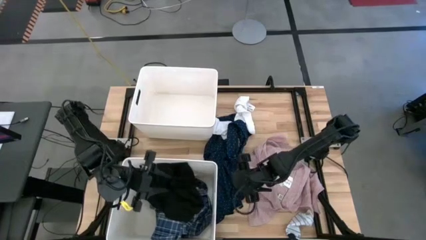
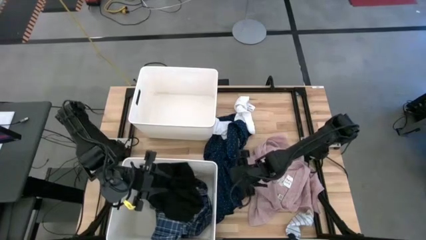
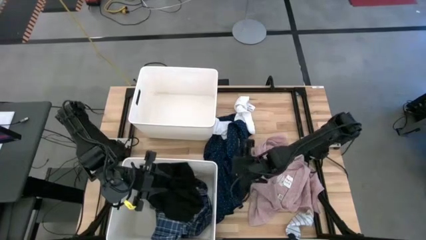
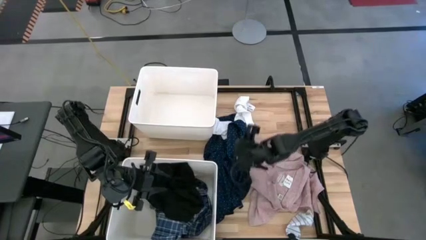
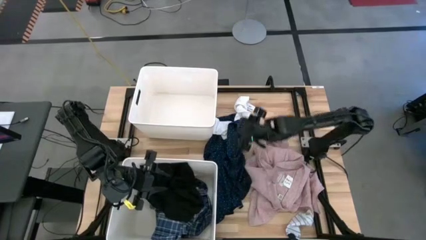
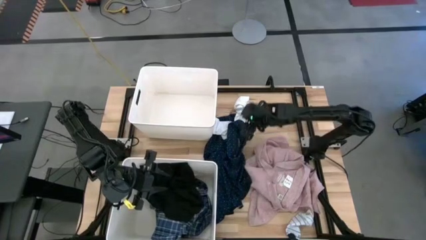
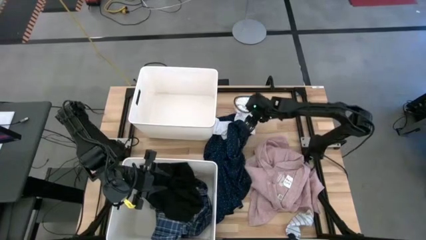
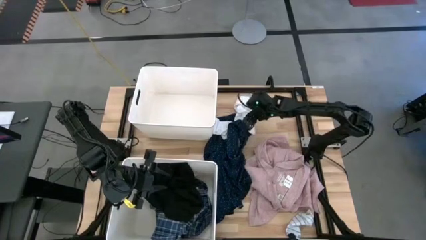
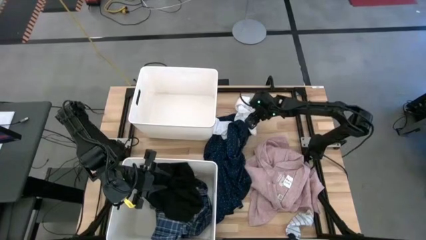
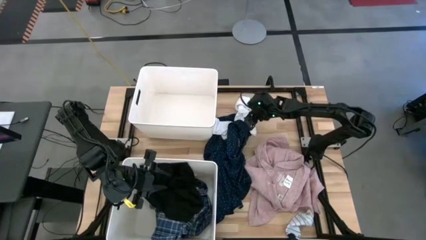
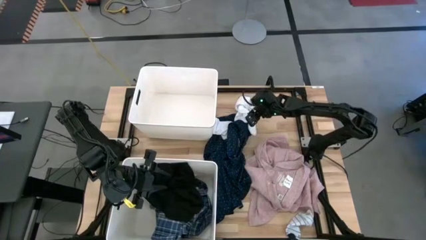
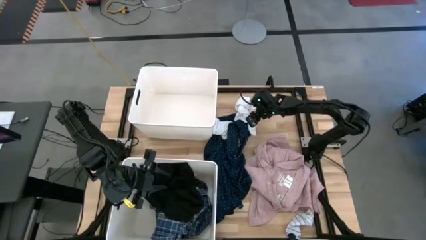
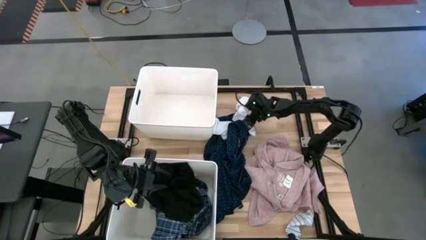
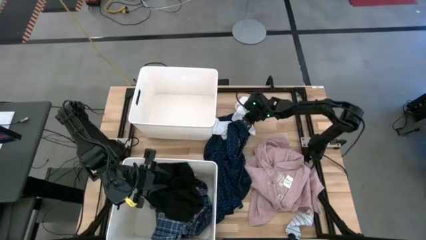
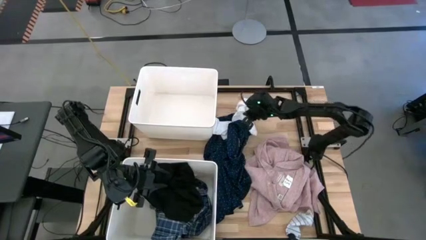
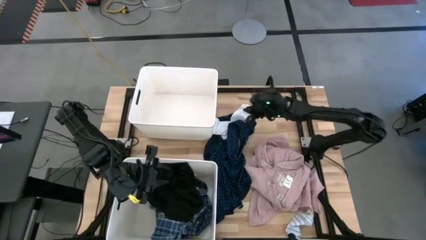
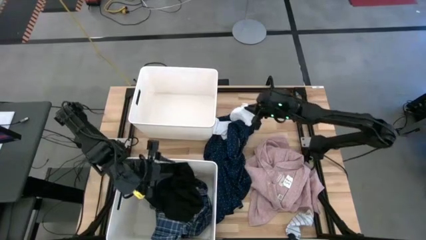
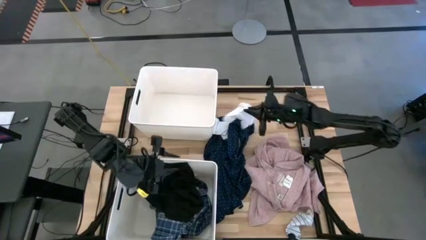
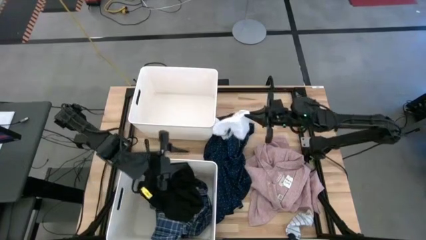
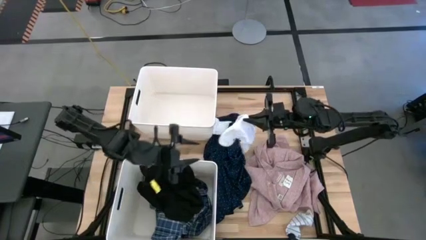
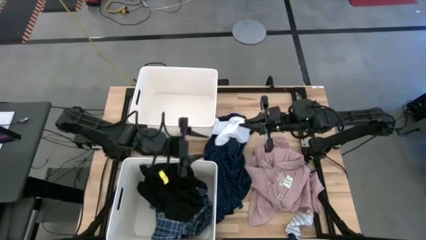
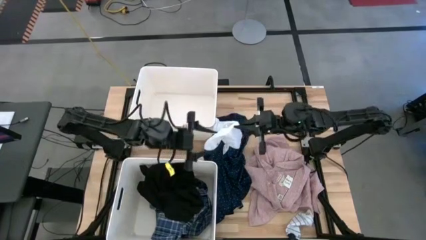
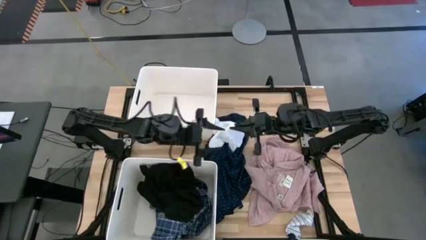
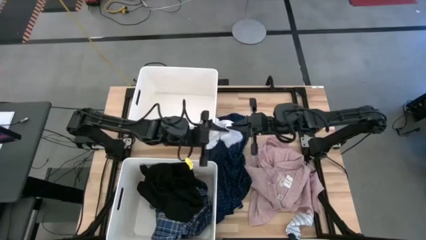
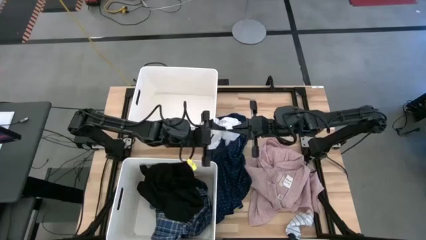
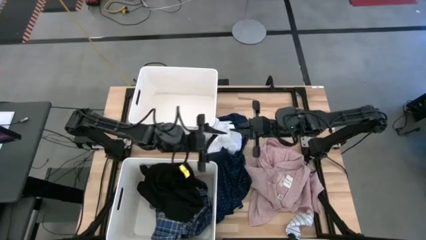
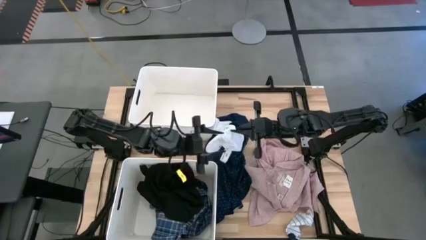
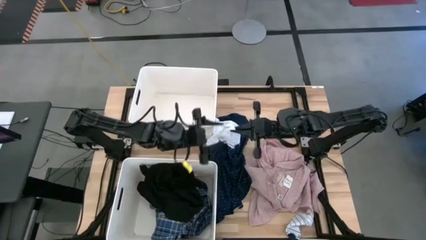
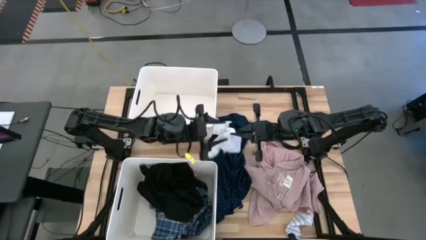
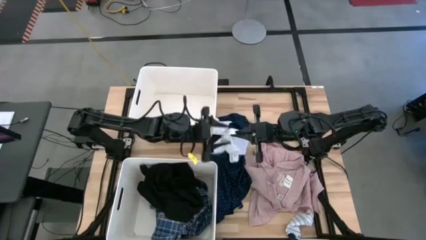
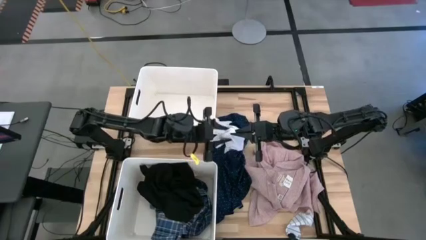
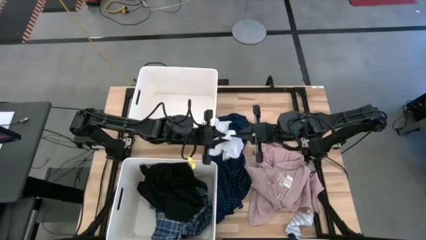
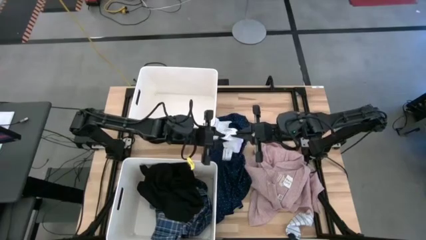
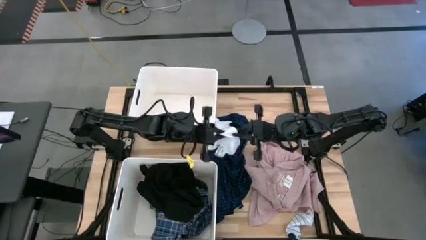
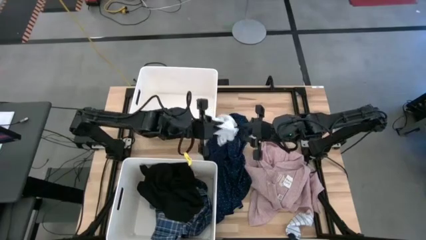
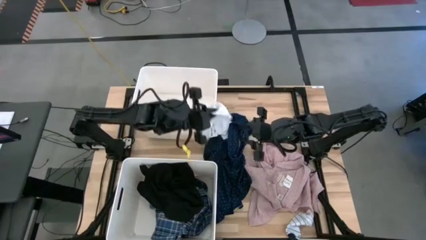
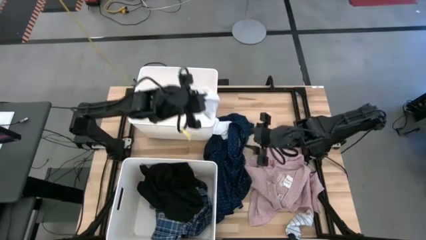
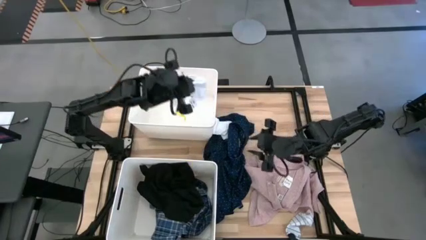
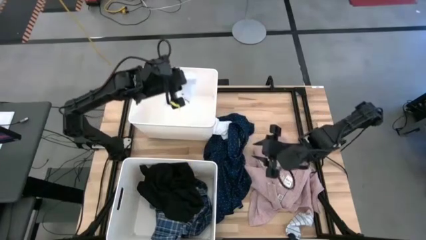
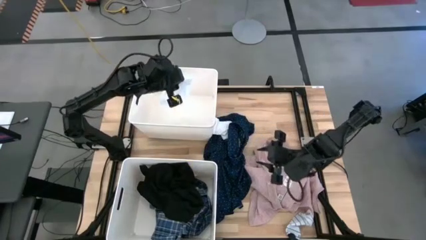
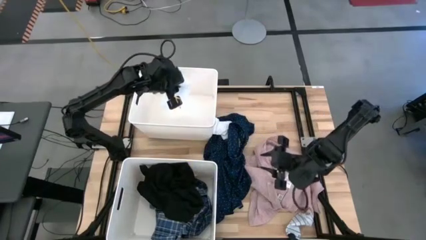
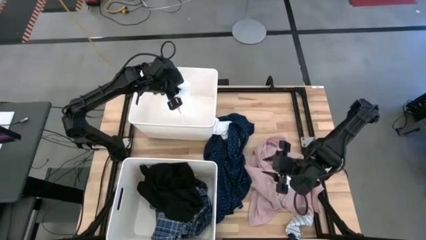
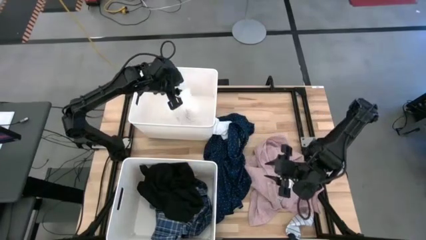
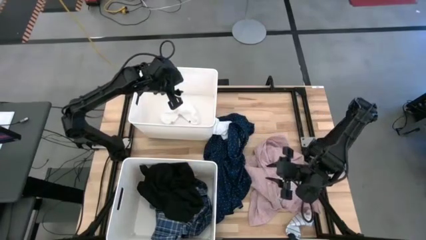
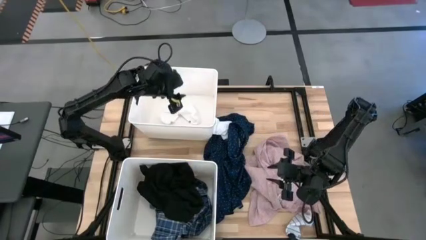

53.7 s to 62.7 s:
Task: Sort clothes
Put the white socks into the top white laundry organizer

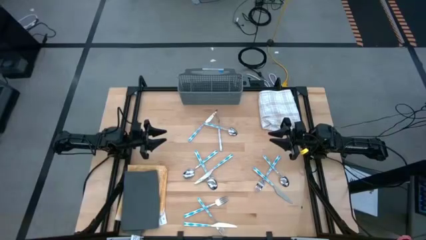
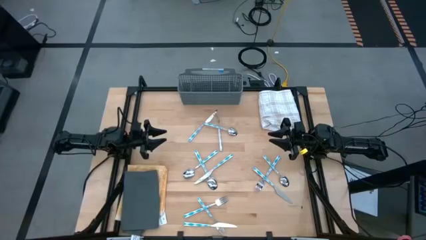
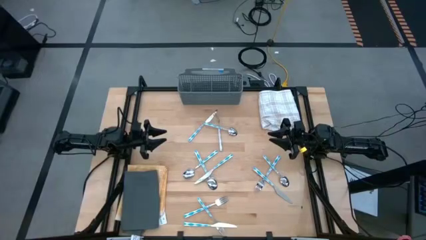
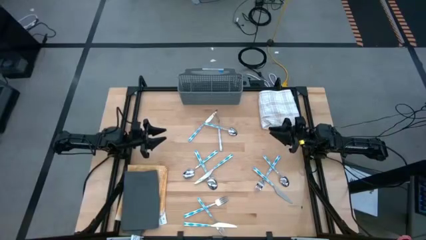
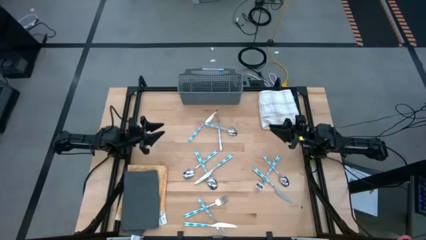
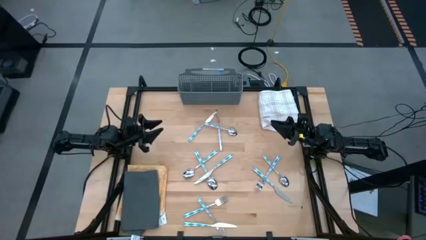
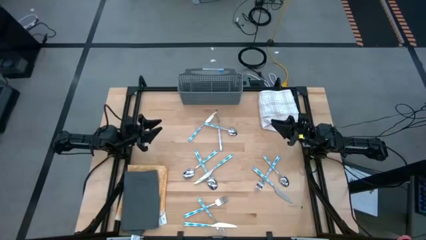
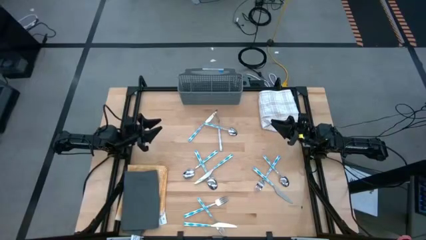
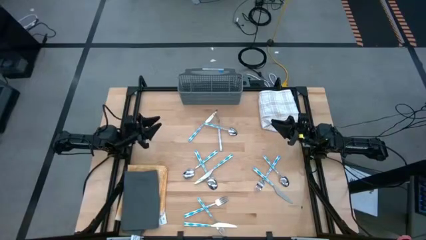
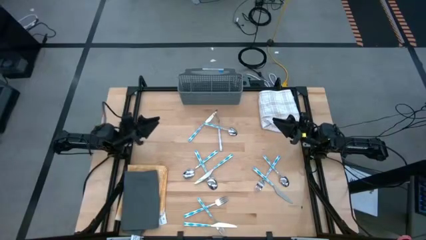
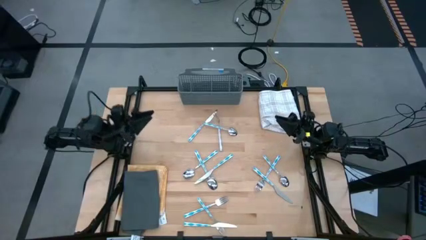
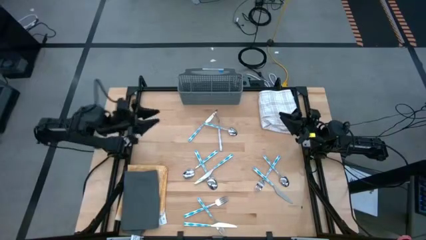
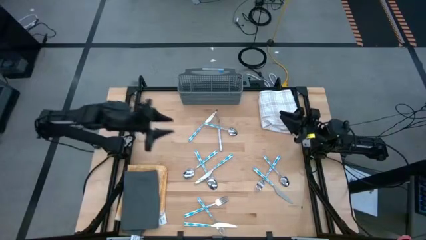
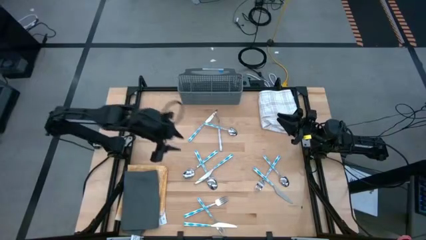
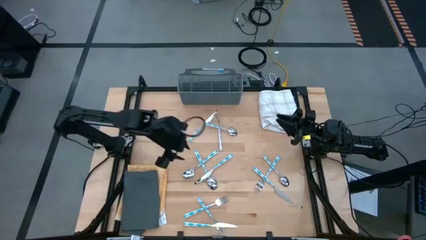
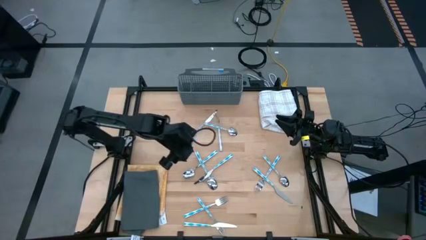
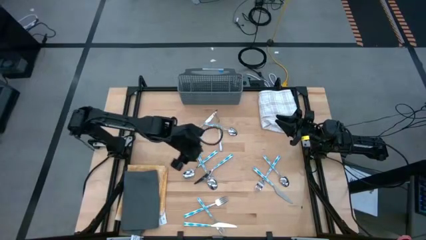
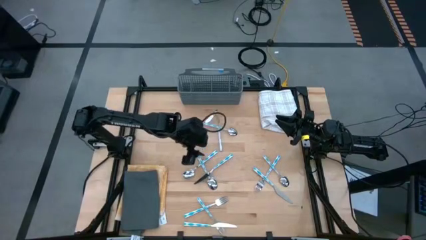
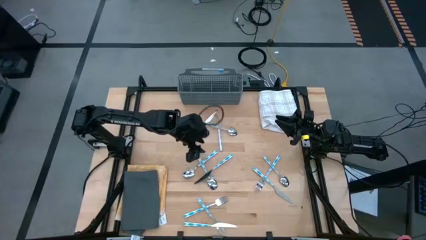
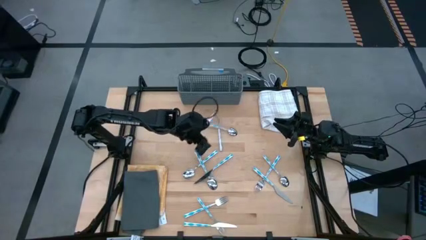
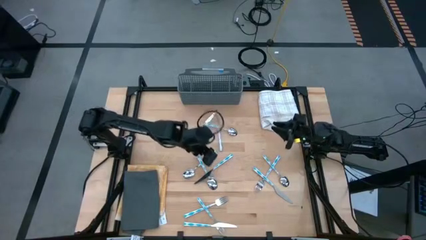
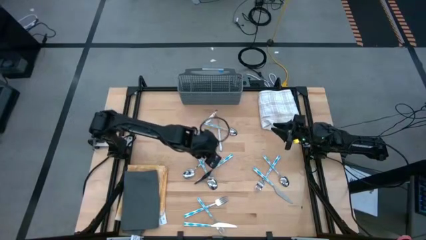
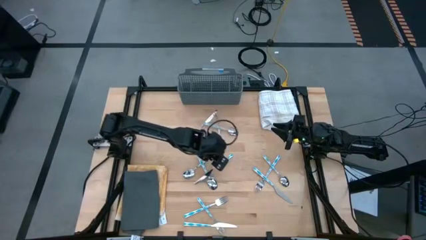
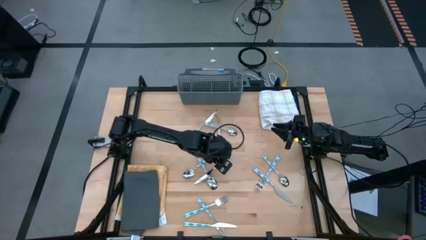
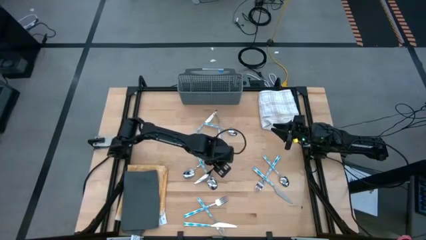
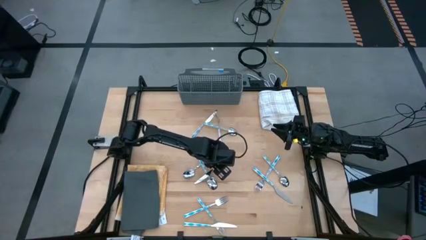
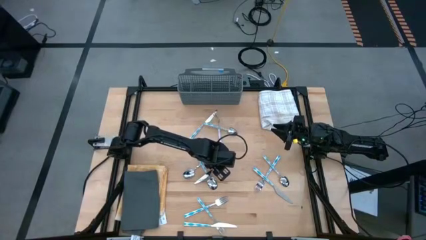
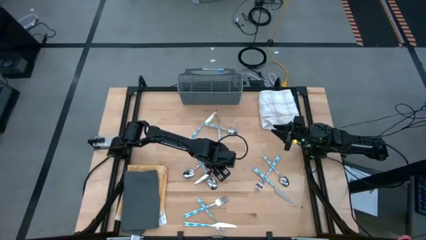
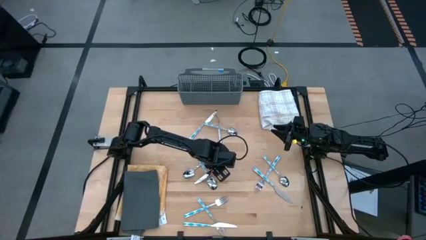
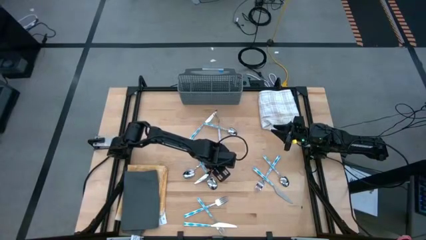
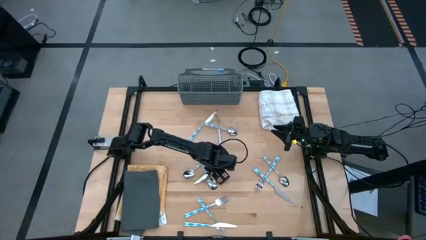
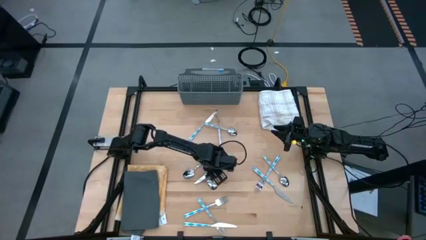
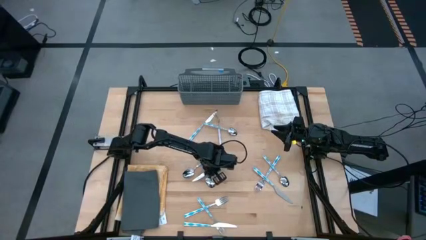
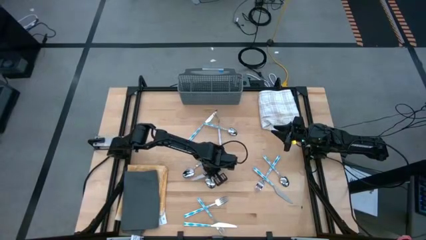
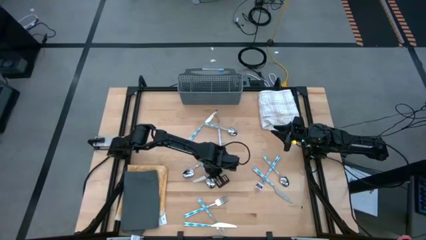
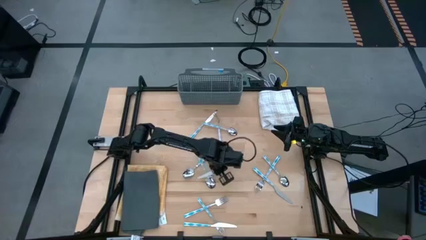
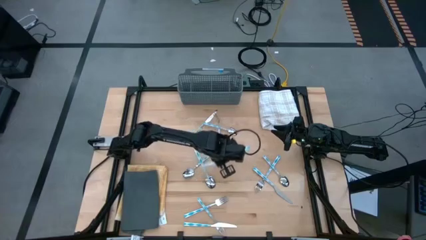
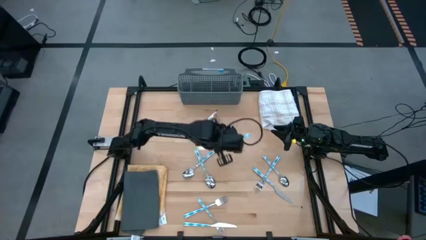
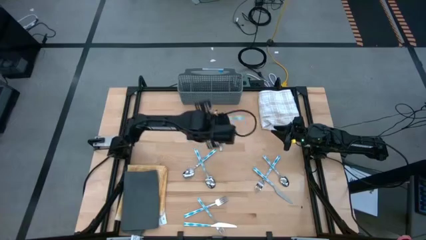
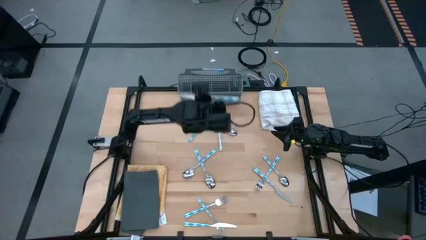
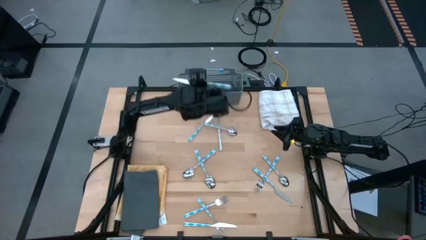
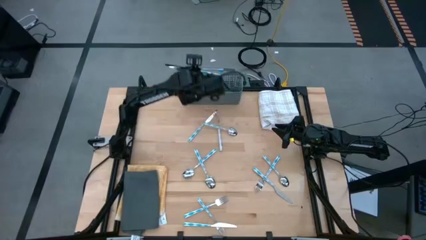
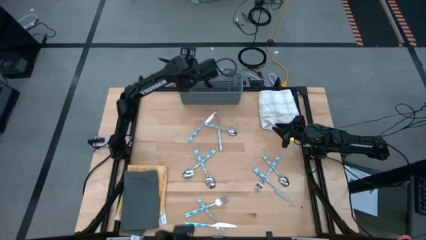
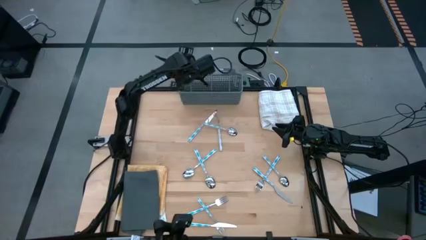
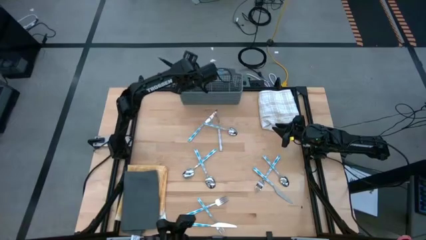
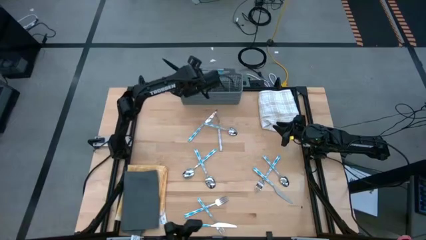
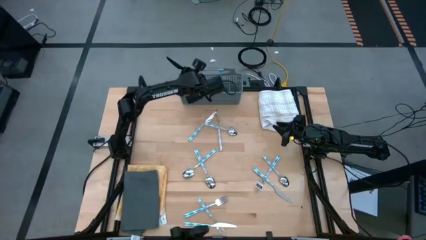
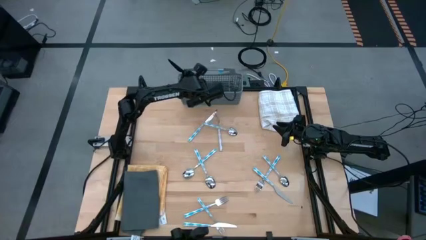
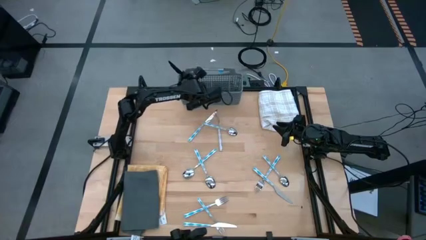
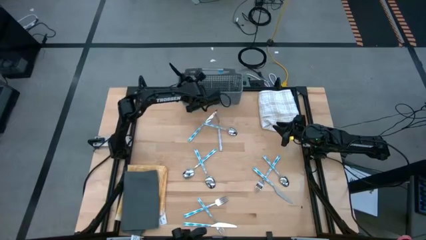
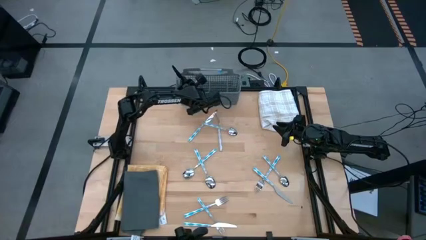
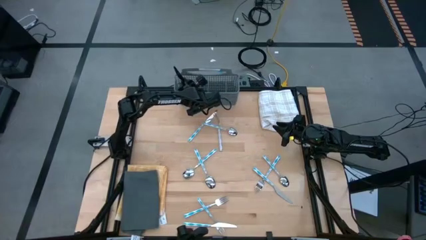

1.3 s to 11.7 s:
Task: Sort silverware
Put the blue table knife into the gray silverware rack
